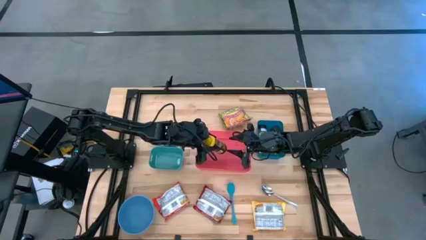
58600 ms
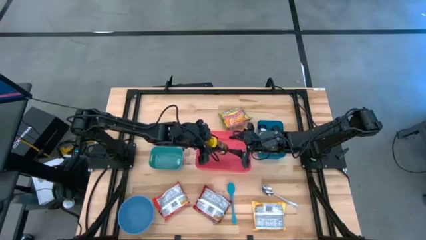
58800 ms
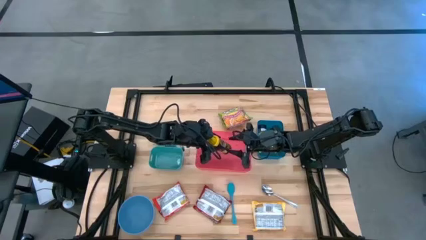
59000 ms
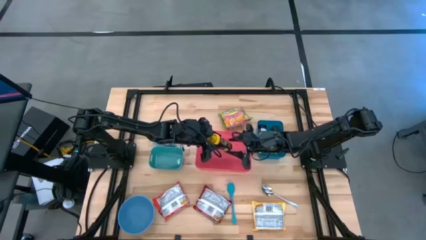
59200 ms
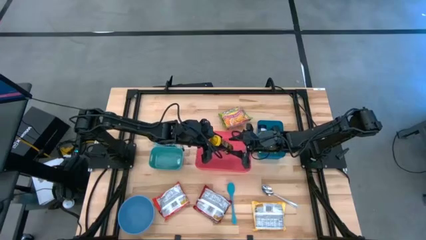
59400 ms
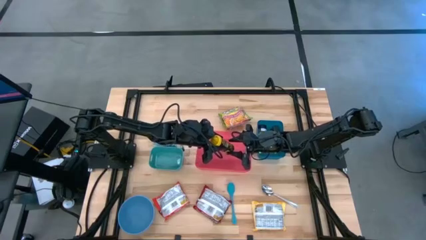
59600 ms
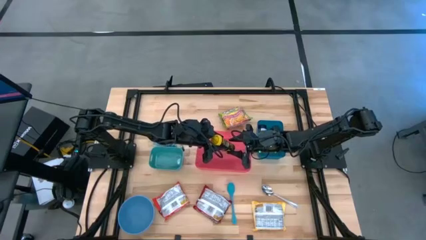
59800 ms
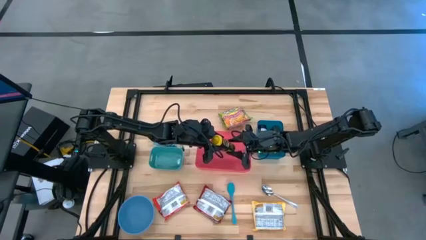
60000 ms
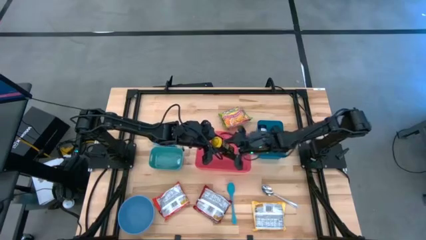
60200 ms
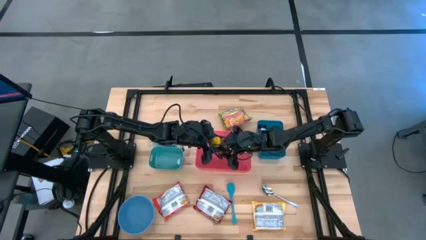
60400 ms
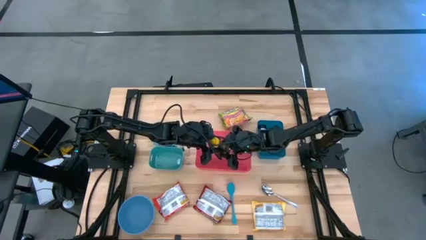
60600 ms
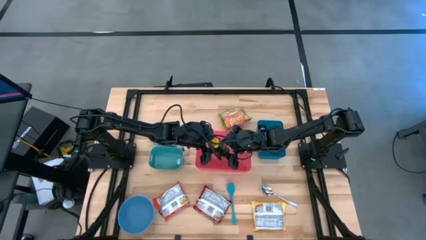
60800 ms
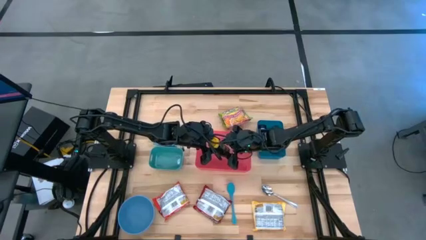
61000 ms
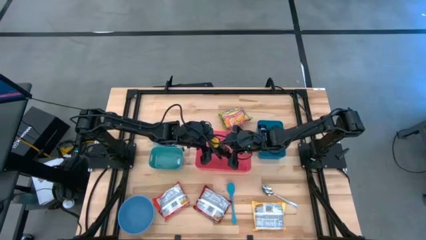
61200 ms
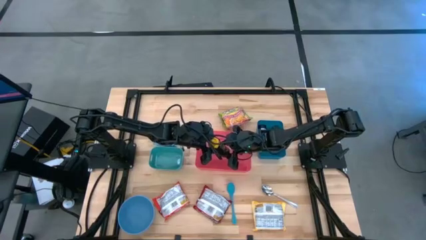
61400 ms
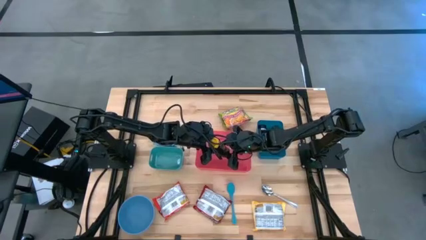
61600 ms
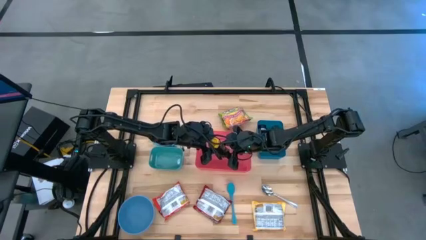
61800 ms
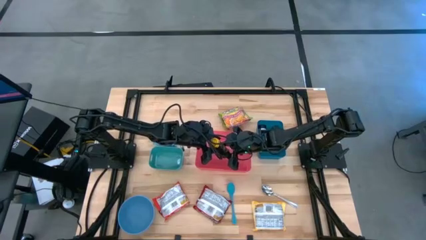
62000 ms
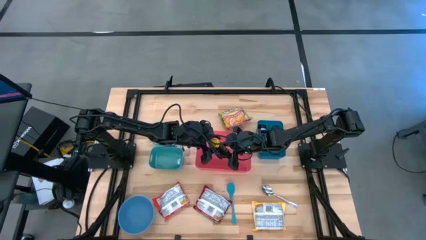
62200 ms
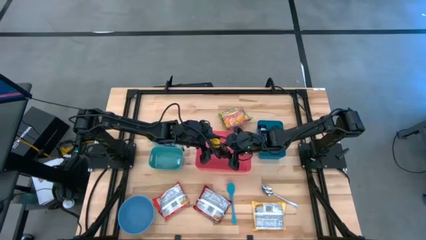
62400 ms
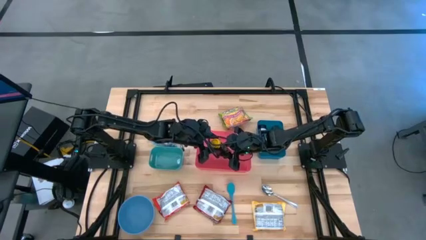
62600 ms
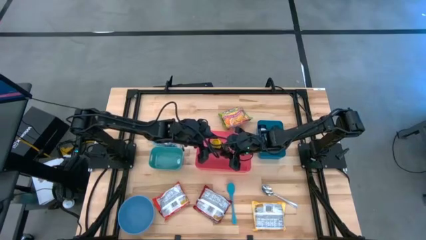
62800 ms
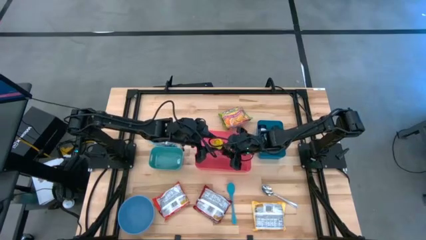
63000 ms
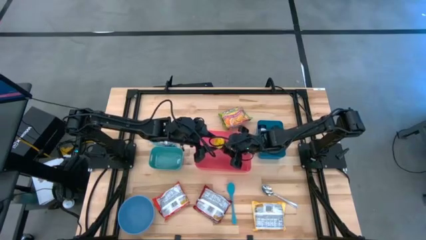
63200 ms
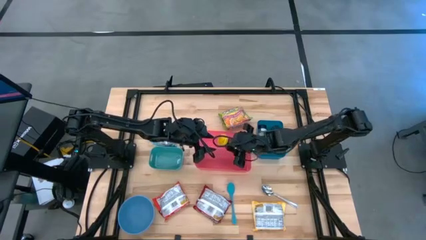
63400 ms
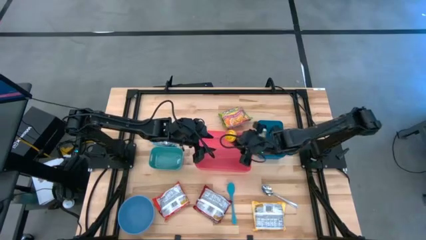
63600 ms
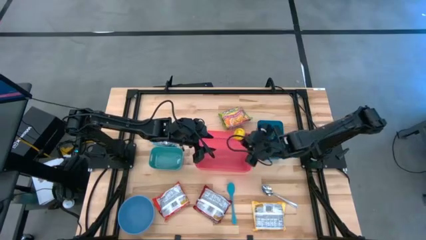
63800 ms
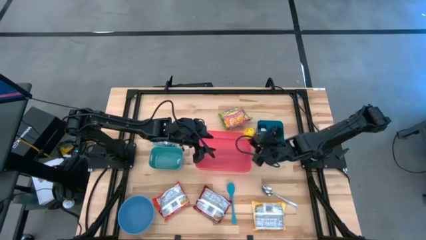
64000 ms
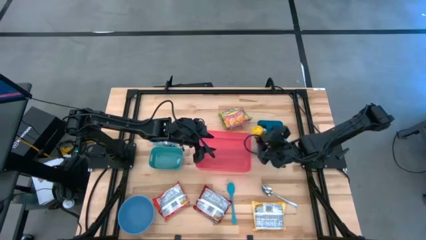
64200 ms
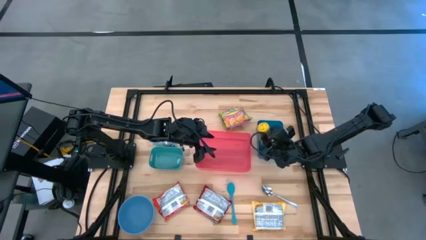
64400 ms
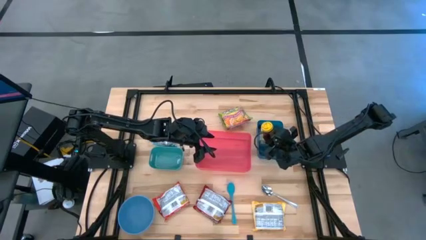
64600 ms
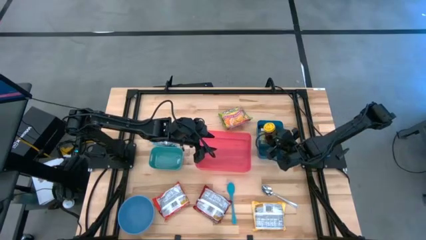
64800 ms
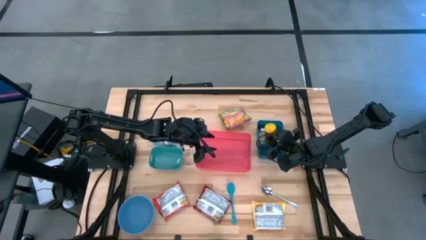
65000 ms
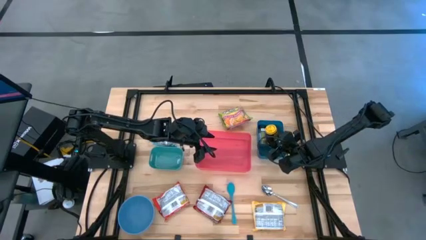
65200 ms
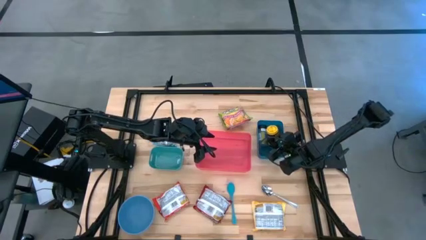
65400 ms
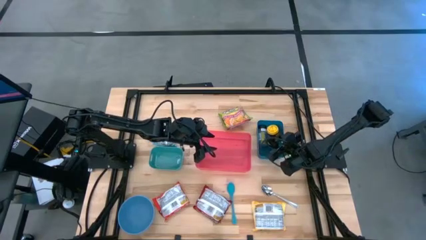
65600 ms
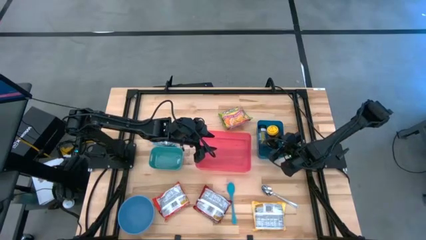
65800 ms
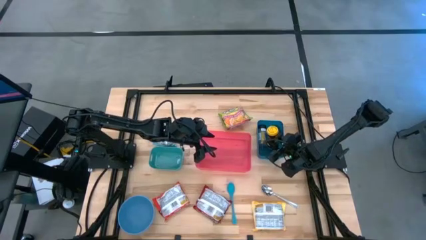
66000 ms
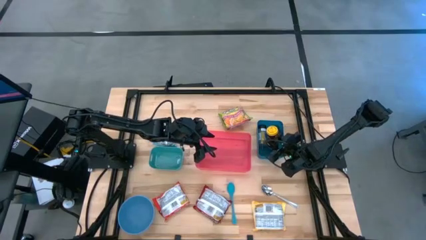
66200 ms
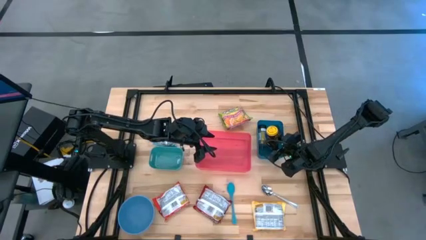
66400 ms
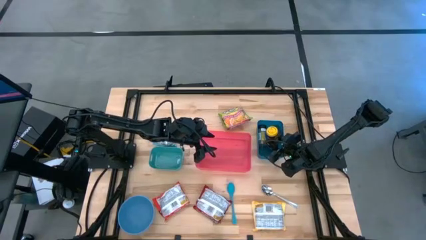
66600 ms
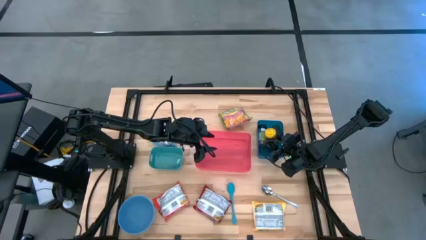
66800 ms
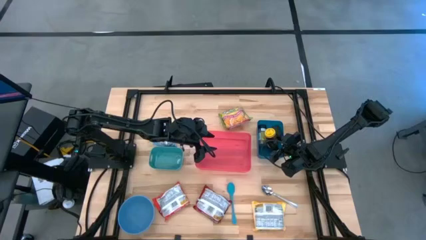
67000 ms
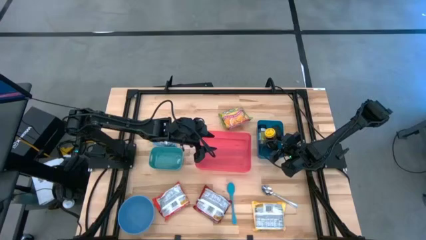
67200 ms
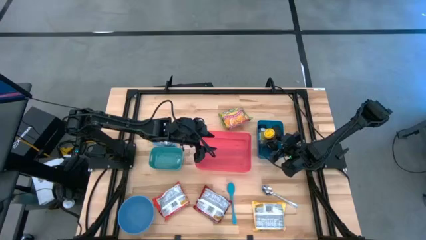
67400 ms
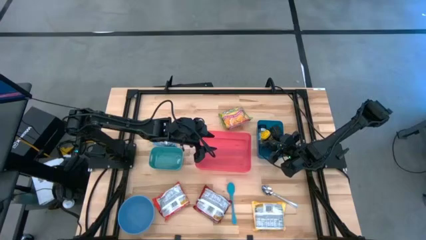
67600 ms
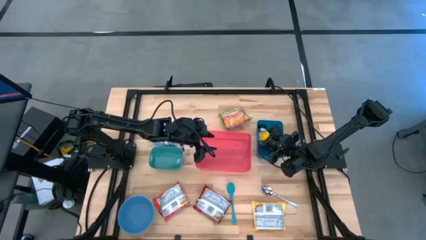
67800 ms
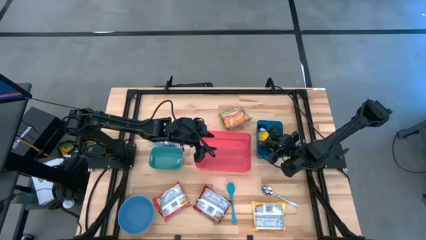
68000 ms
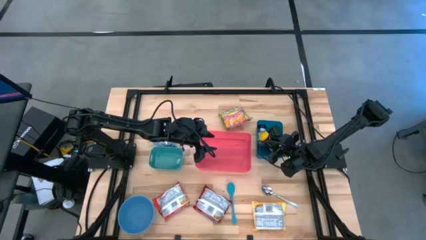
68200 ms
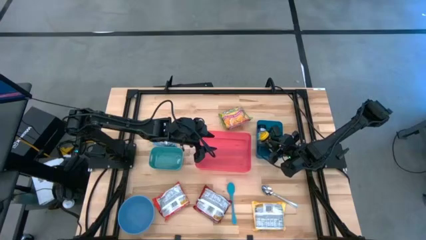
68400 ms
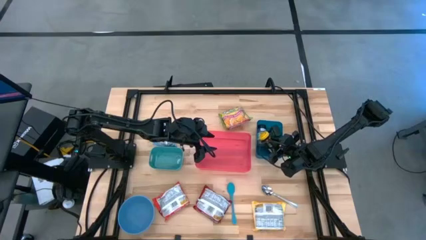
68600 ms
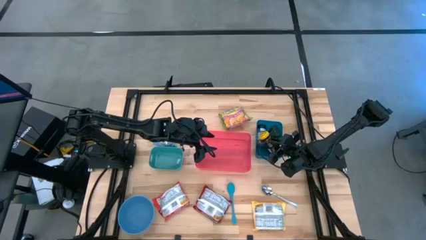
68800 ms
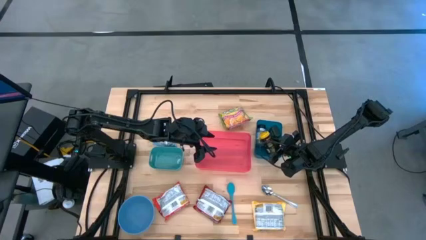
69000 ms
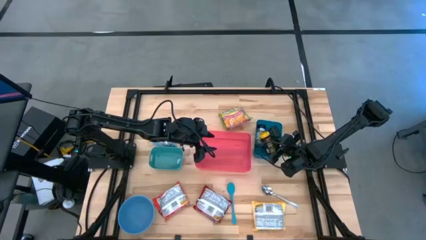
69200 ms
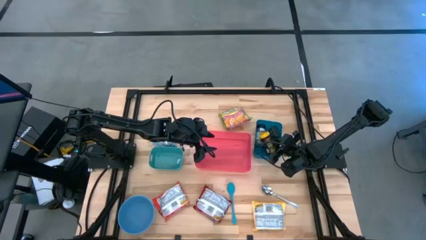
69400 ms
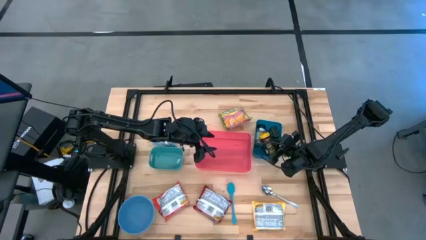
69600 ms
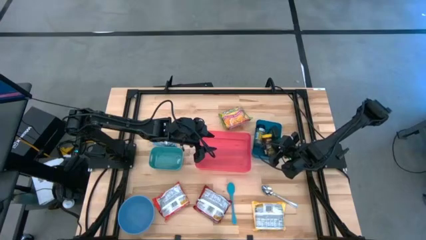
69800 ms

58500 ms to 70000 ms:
Task: Pick & Place Food Item
Put the yellow seasoning bottle into the blue bin

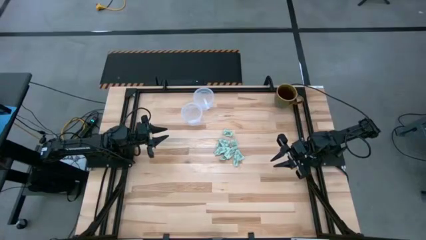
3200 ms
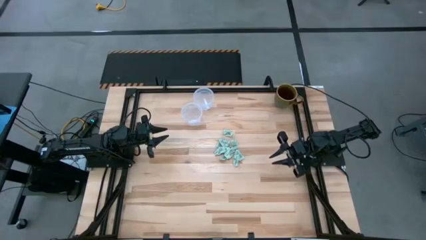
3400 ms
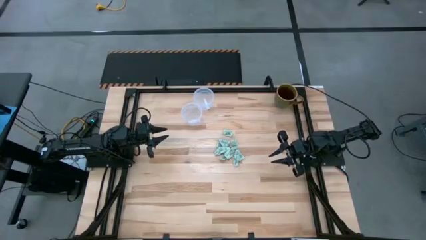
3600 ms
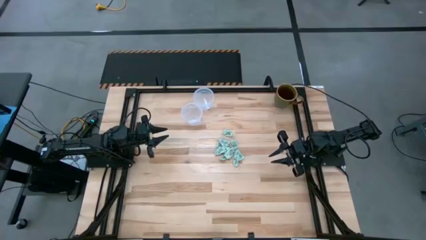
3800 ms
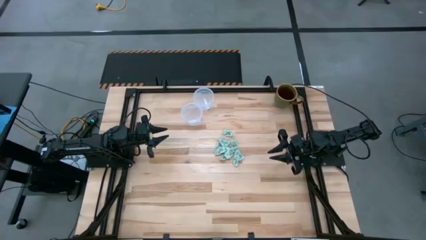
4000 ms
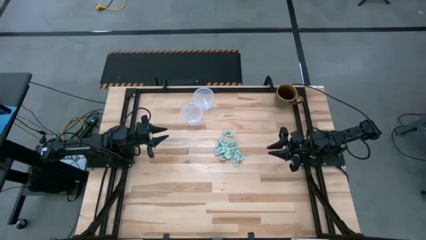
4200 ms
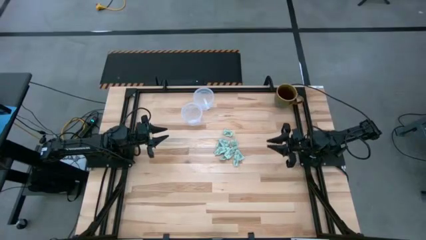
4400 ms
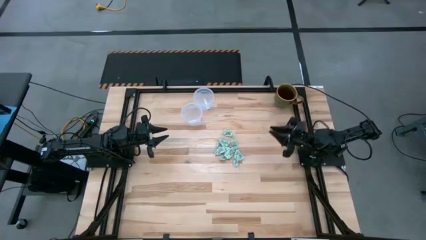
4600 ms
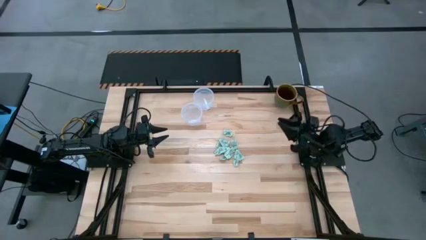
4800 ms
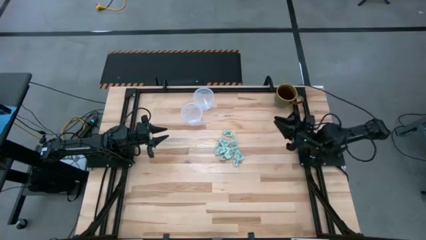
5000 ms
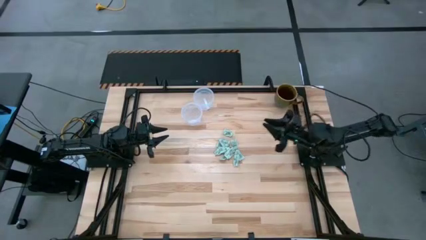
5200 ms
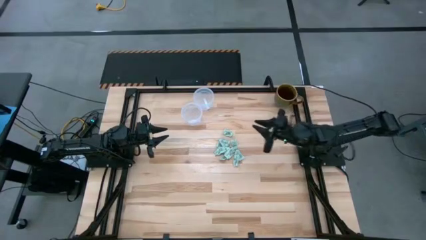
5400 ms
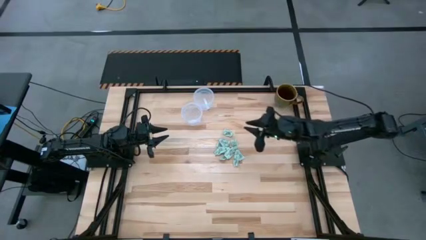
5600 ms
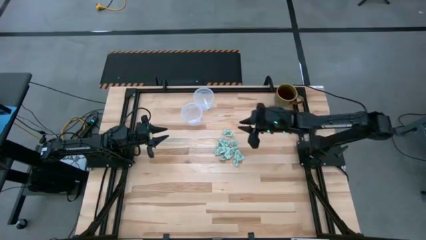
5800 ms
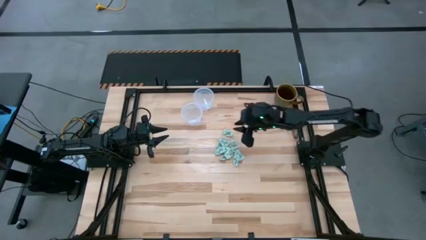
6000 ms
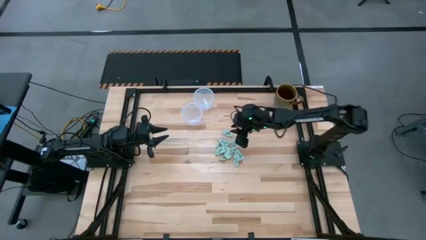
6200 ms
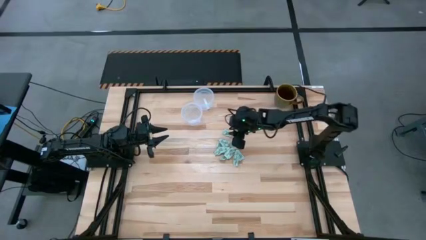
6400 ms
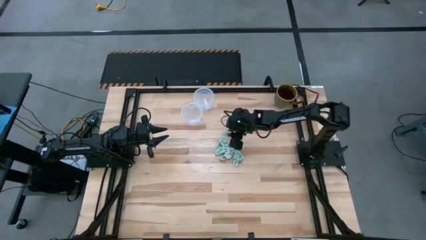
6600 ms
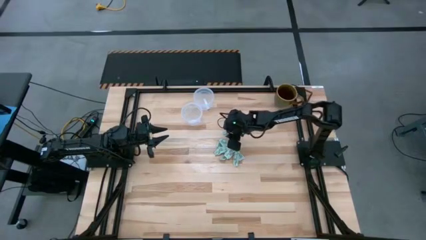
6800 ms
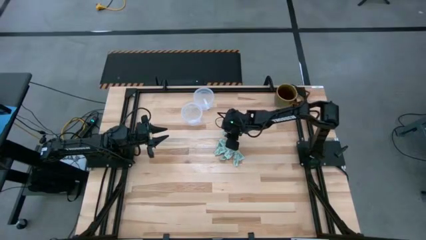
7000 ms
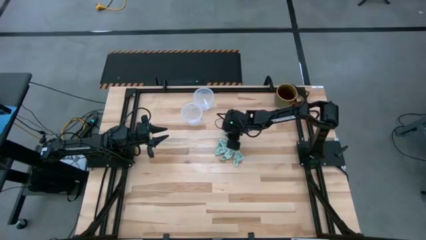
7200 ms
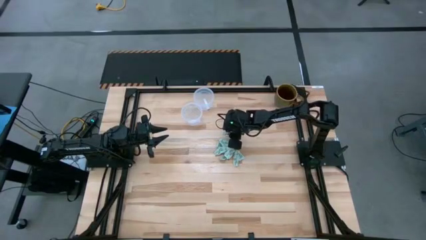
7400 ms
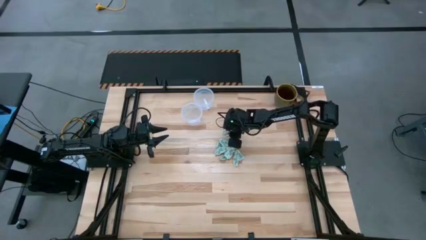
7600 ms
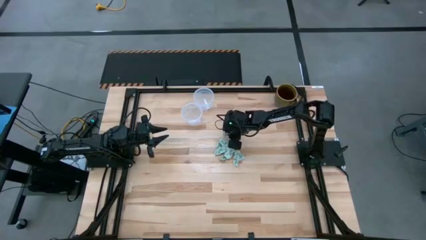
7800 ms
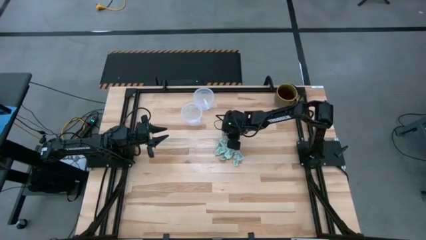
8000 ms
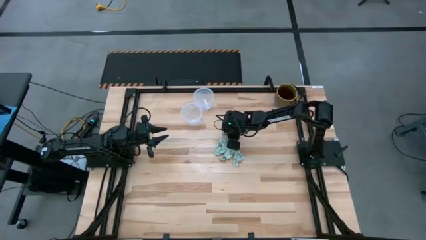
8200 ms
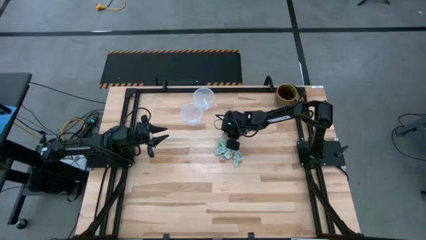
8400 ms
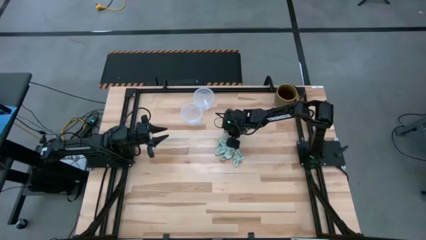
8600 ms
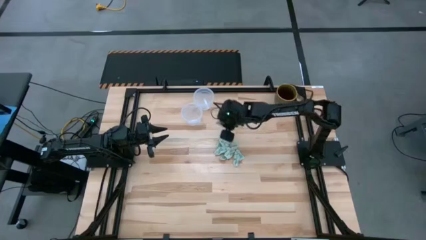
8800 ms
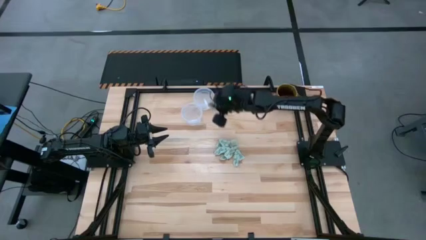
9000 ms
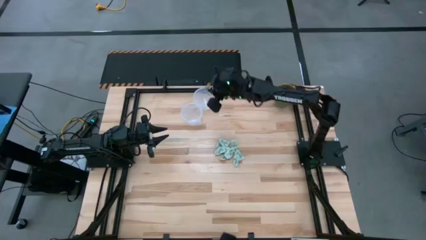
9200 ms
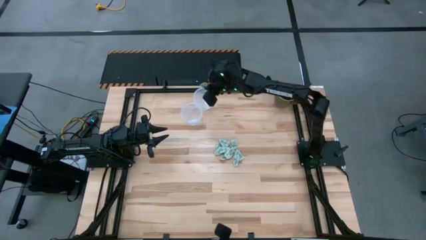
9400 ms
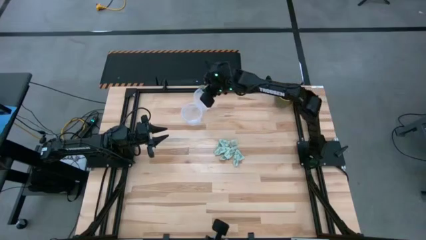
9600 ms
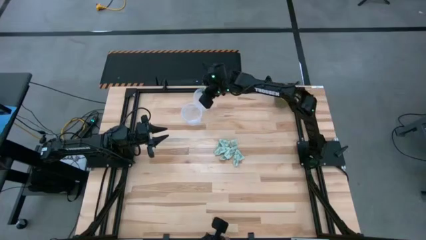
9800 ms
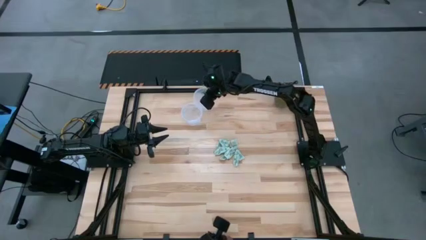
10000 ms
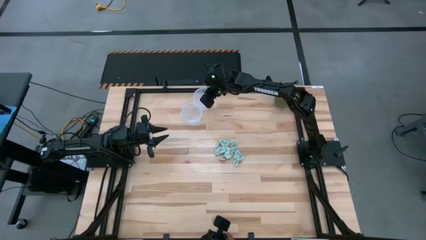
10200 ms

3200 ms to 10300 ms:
Task: Pick and place items into bin
Put the stevia packet into the top bin
